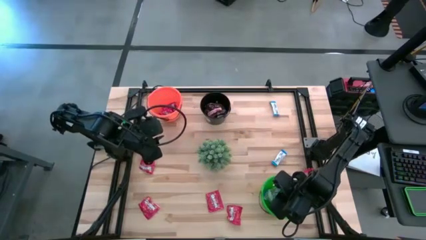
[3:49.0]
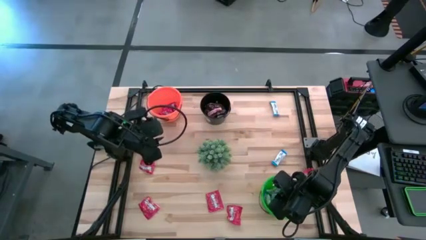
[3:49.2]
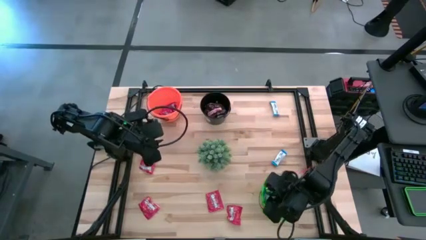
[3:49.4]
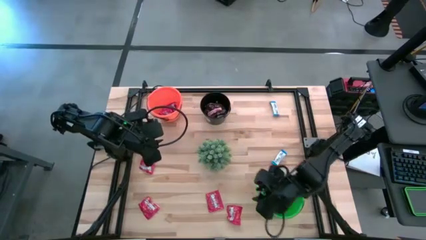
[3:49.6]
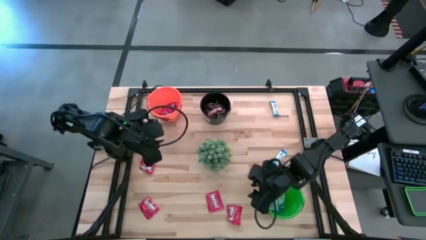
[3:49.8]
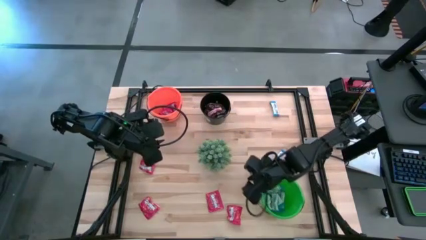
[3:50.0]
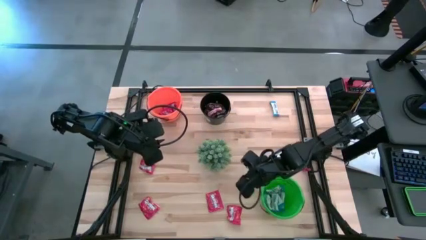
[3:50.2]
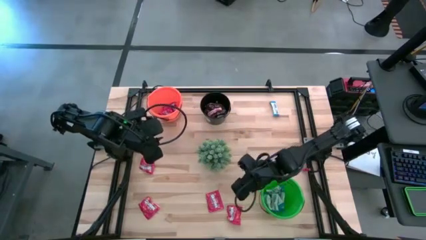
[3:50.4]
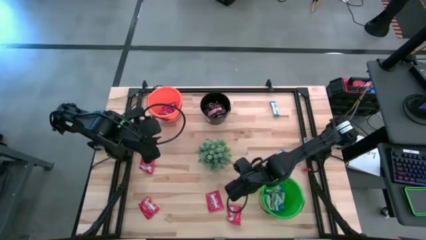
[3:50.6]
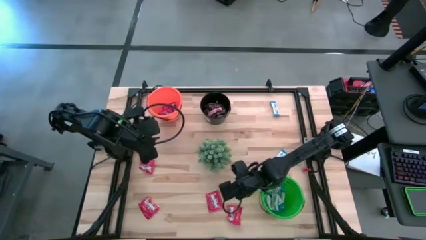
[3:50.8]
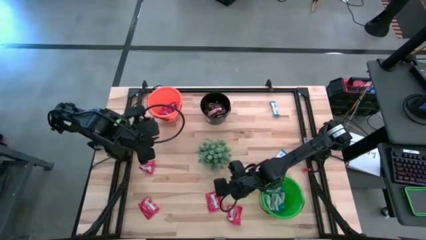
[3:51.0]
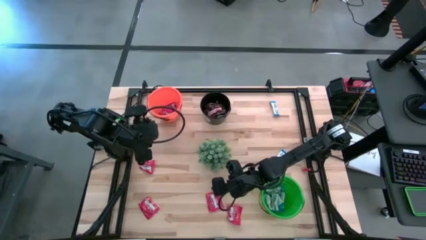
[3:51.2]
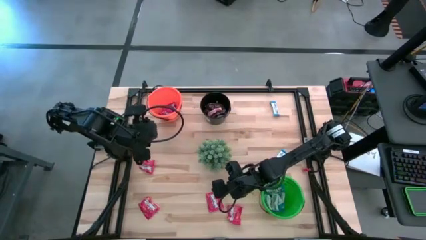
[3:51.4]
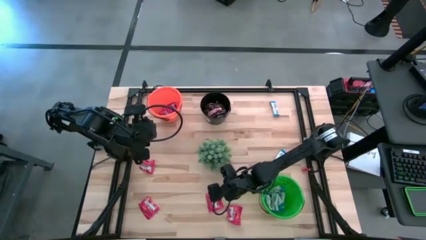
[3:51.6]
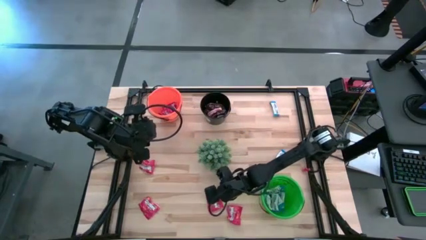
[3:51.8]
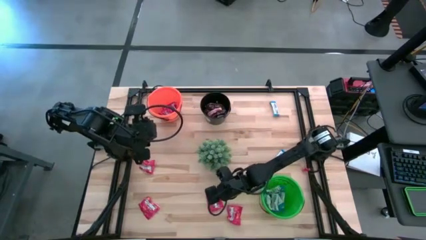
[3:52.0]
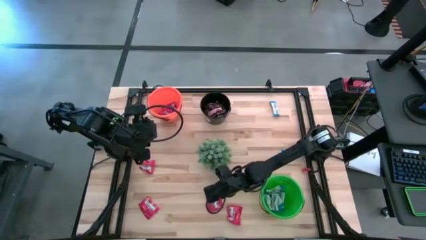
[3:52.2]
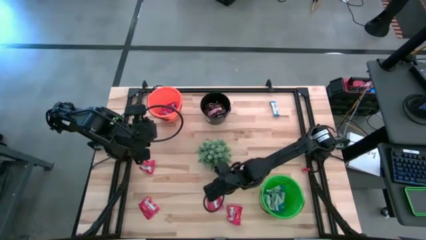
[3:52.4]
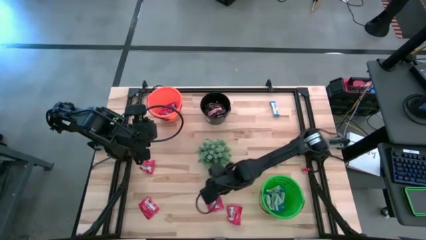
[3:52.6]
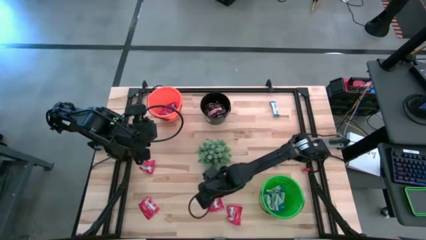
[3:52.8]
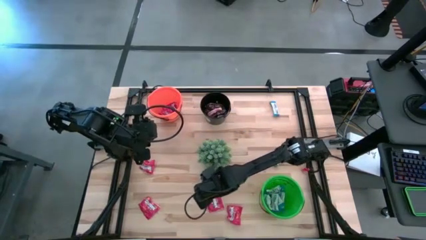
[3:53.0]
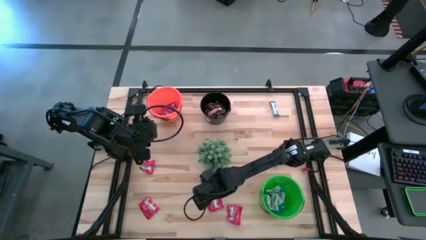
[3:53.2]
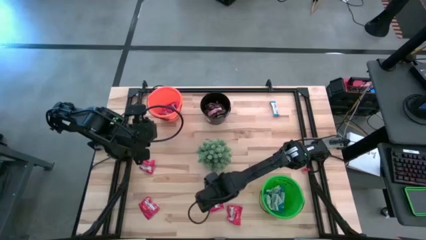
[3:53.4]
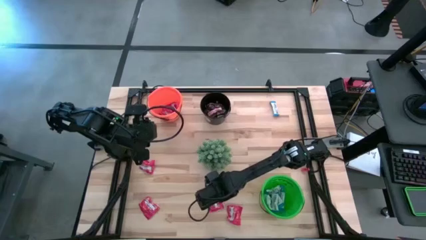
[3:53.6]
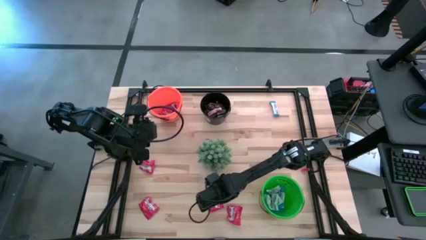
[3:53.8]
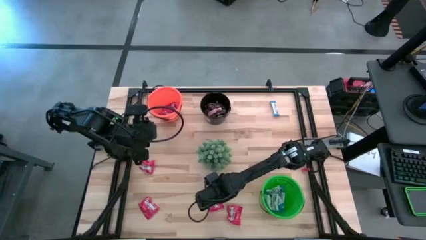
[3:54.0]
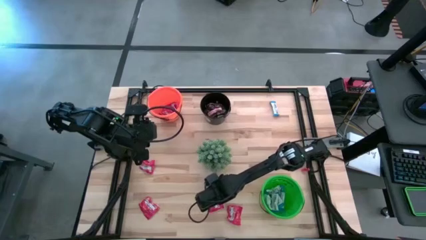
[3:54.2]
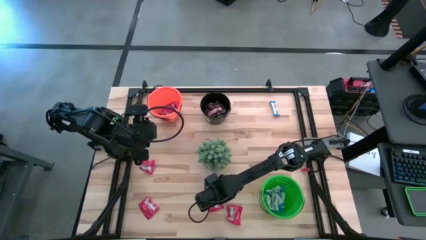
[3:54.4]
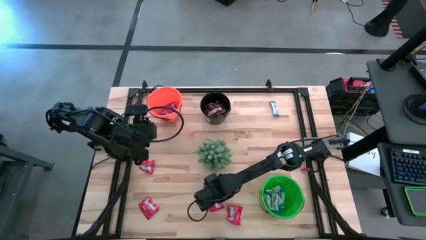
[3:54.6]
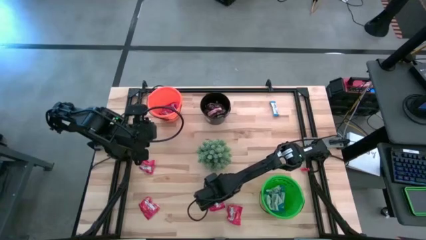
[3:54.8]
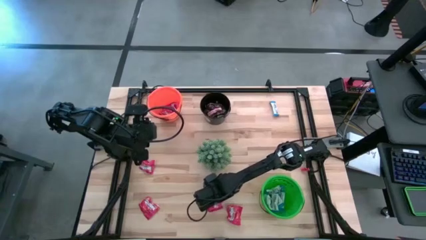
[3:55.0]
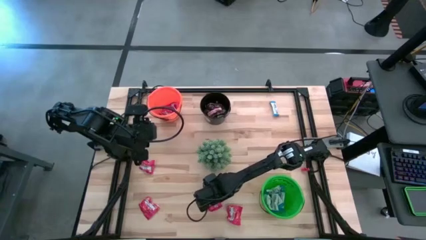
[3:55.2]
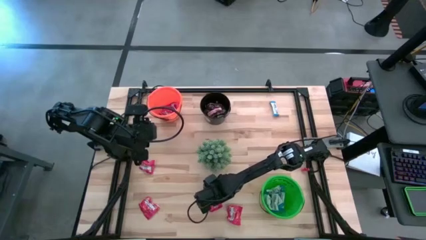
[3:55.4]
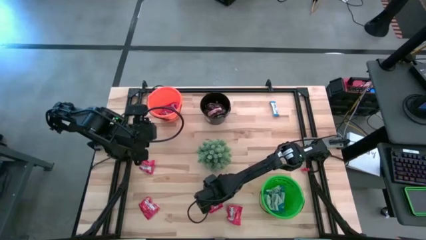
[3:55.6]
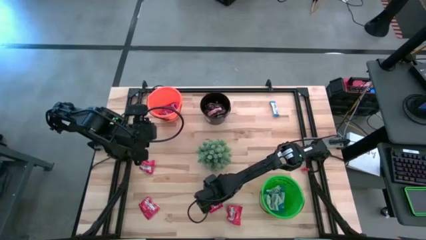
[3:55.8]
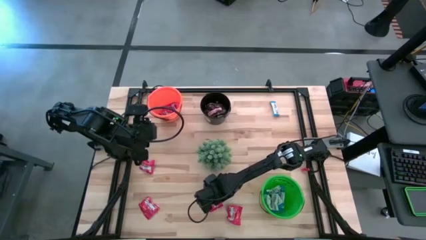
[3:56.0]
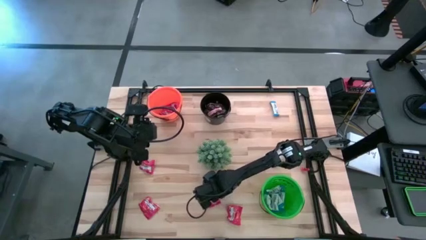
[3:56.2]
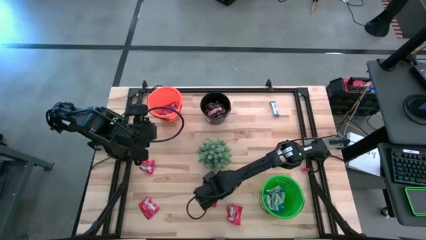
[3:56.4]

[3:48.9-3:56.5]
Task: Sort candy
Put the red candy into the orange bucket

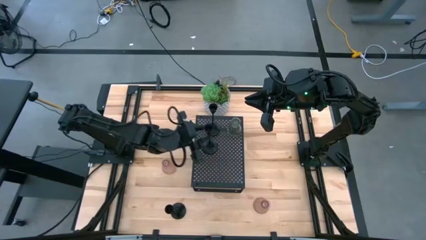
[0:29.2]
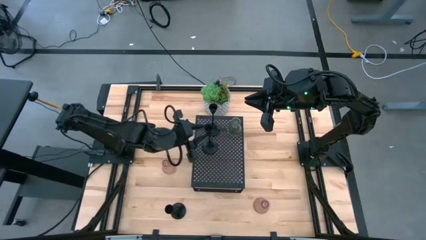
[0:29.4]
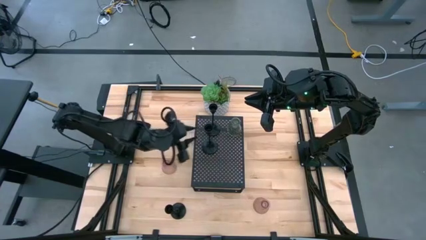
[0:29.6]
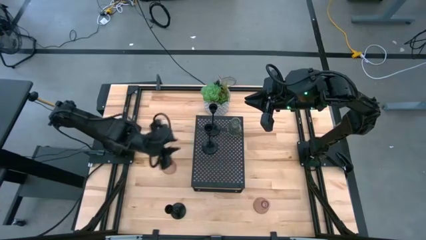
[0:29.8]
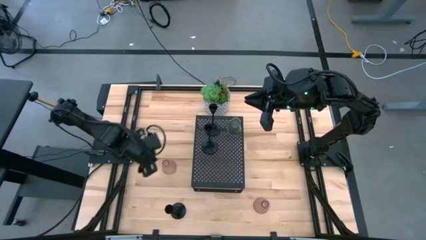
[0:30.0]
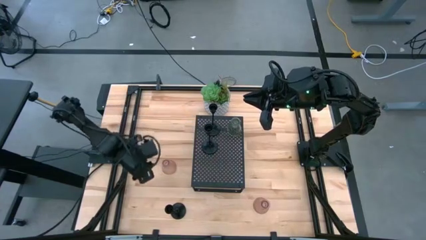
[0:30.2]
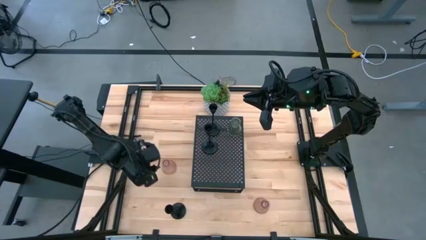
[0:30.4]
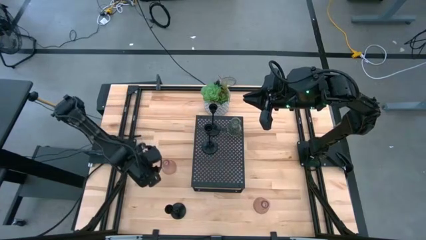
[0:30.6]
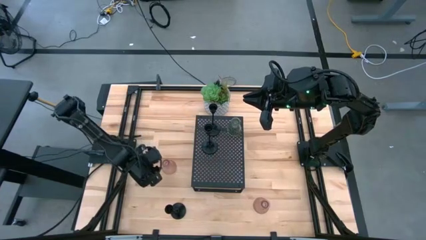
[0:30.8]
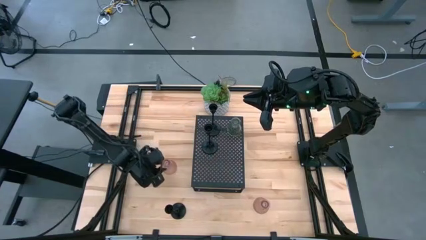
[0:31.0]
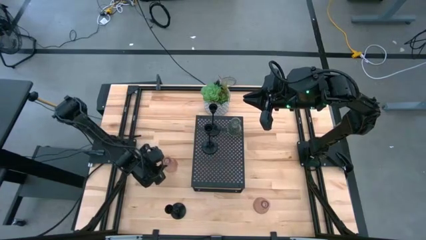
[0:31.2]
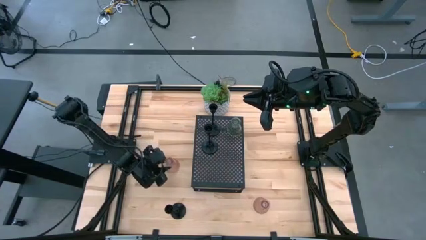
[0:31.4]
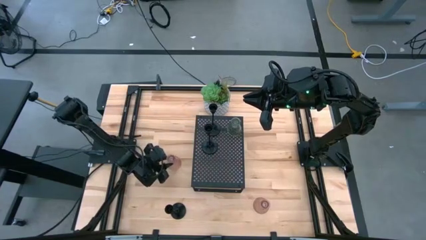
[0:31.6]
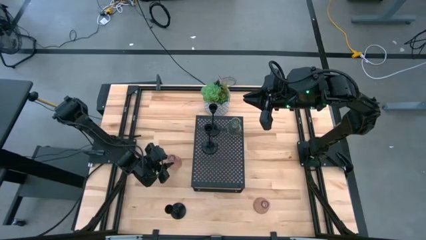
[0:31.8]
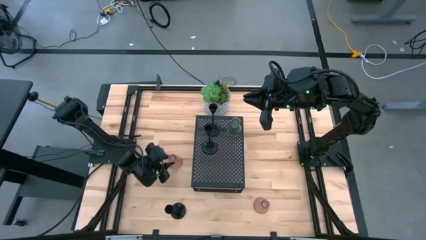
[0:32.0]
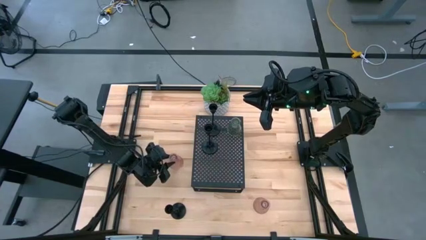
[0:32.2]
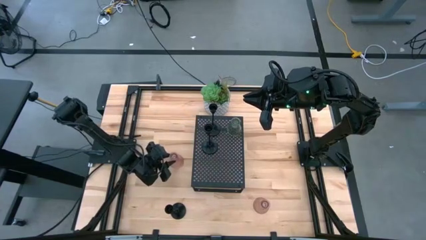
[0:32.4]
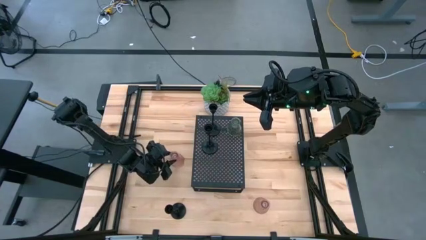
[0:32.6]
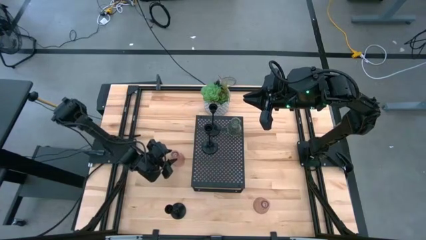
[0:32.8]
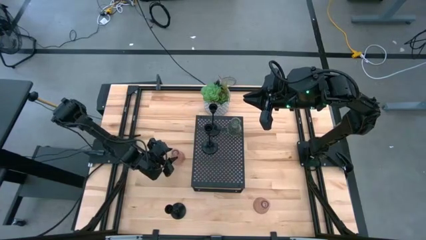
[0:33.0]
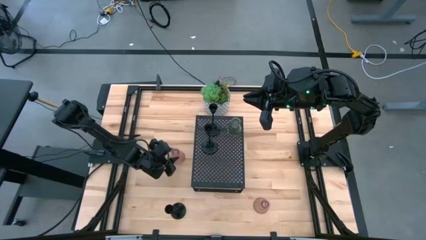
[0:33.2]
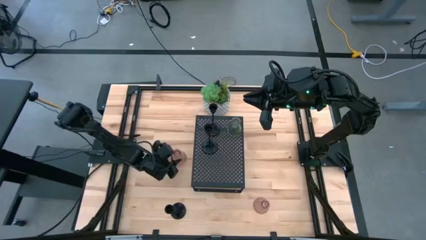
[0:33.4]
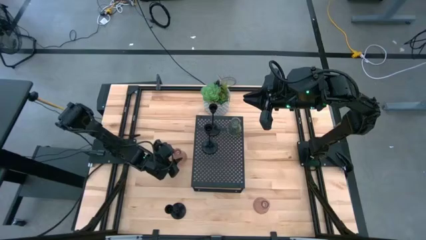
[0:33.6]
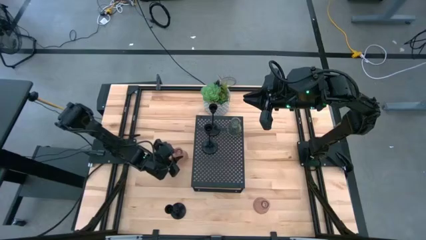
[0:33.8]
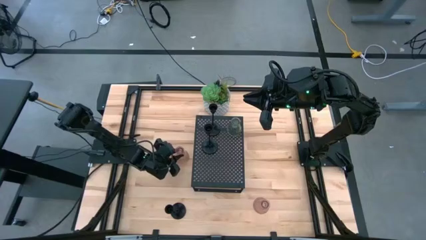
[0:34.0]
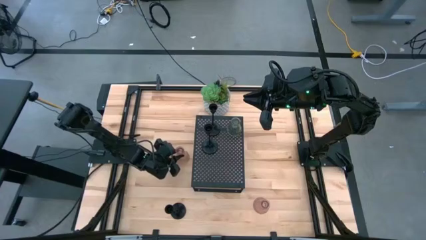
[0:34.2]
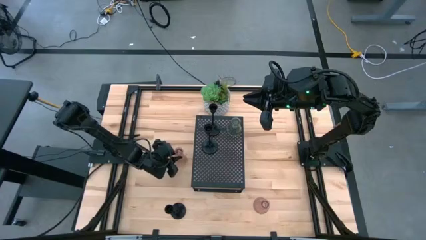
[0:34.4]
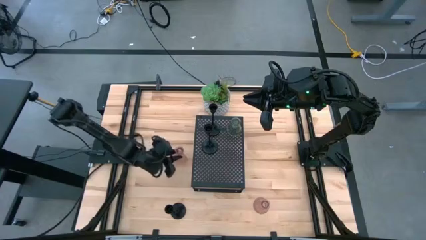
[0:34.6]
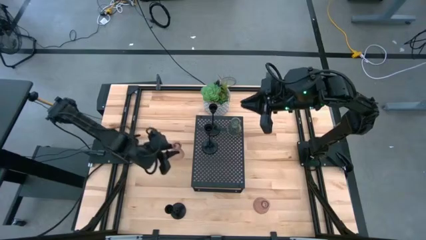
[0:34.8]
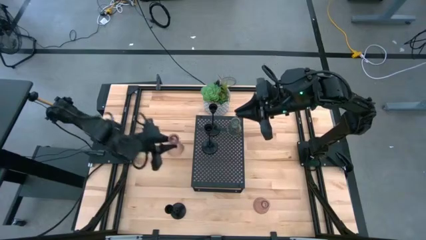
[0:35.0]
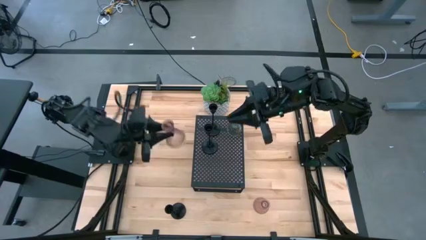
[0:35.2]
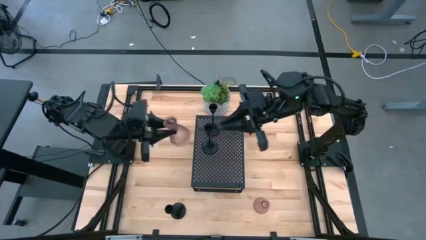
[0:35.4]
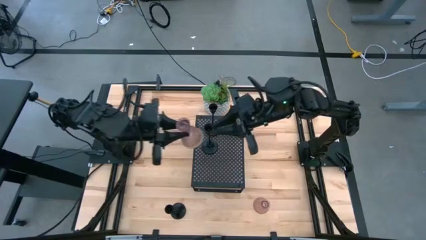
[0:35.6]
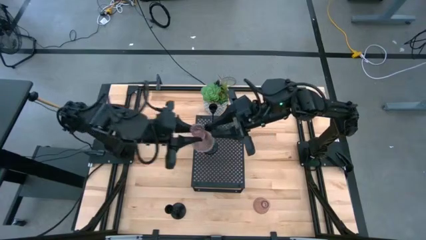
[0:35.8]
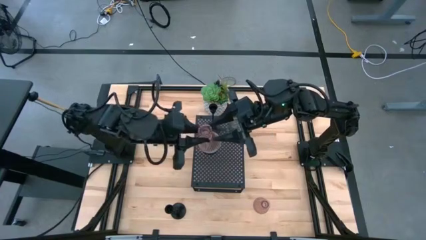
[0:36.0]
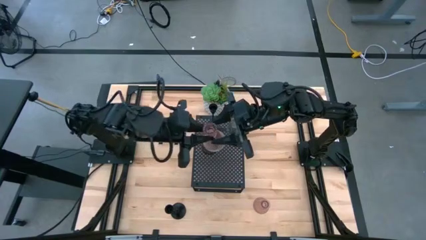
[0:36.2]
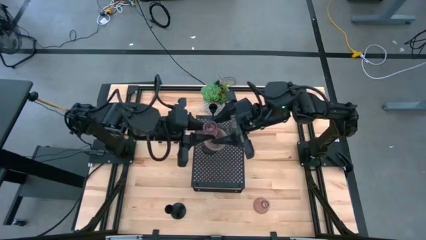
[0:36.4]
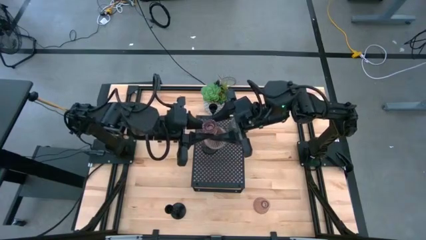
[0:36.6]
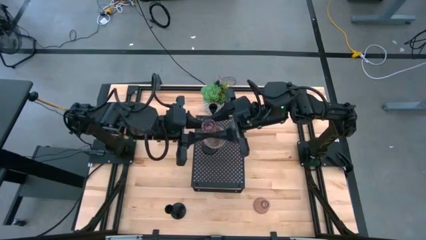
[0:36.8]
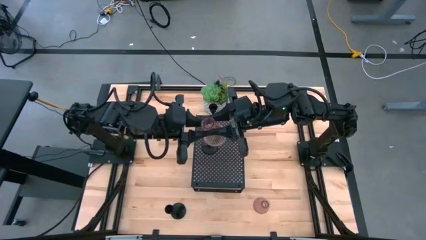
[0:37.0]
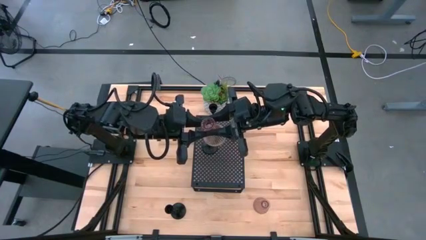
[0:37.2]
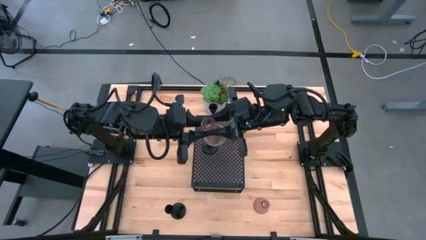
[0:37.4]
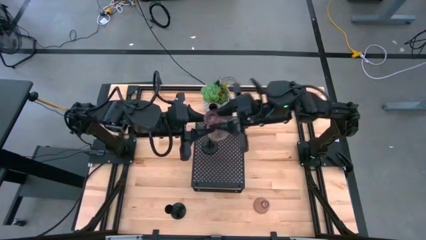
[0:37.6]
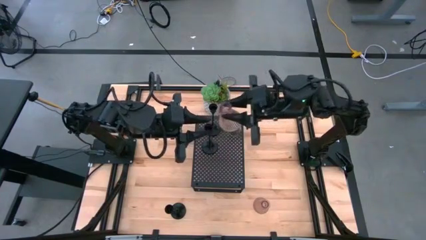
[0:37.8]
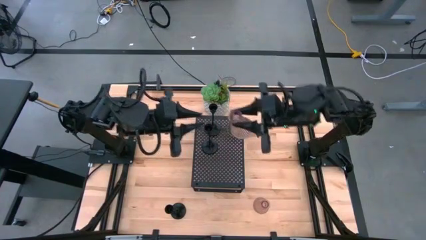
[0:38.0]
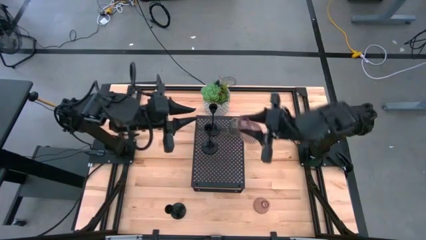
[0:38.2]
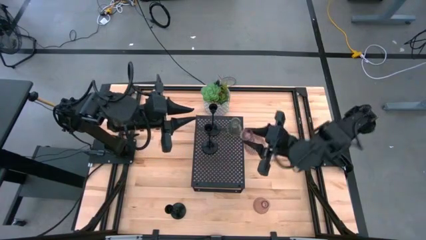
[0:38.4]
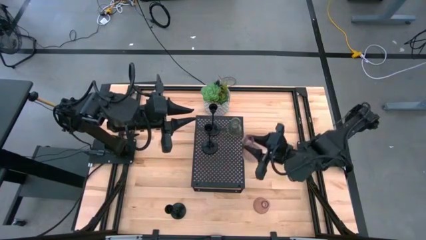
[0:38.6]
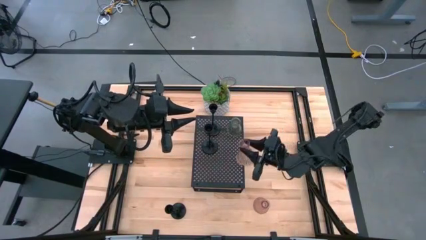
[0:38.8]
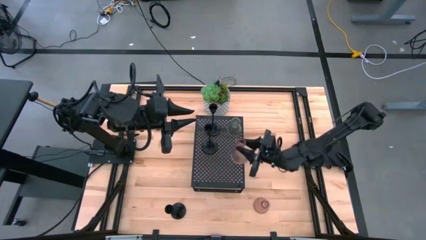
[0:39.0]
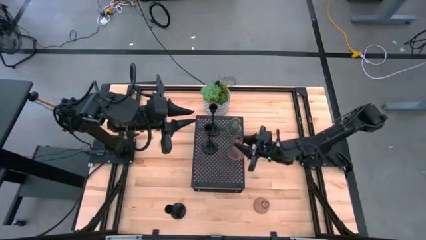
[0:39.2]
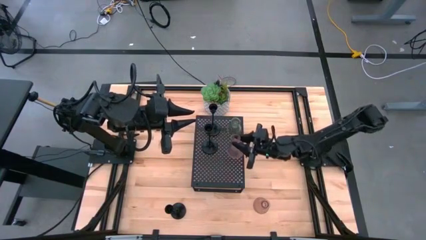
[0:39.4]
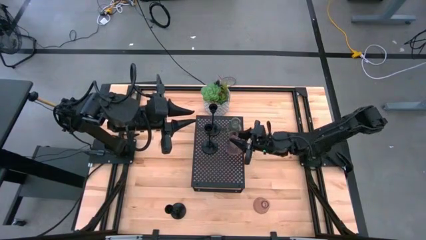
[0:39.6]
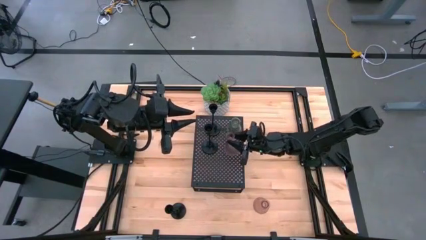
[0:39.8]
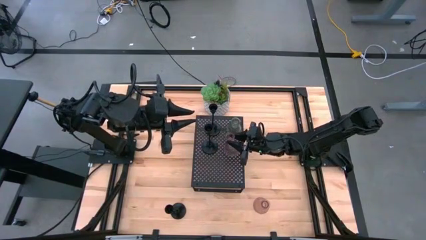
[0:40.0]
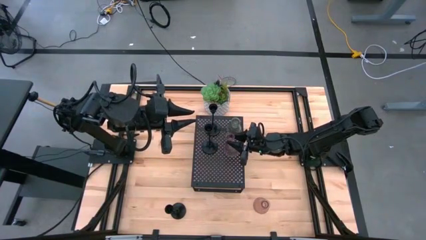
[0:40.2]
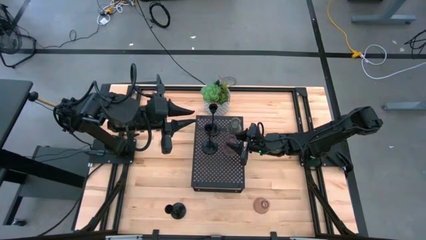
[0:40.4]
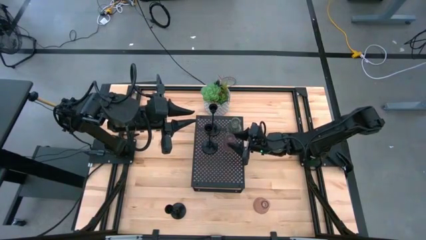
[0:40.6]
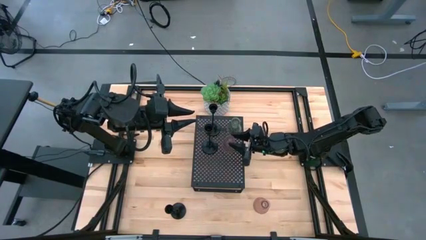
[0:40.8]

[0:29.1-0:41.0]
Task: Pick & Place candle stick holders
Align the pink candle holder on the top with the green candle holder on the shelf
